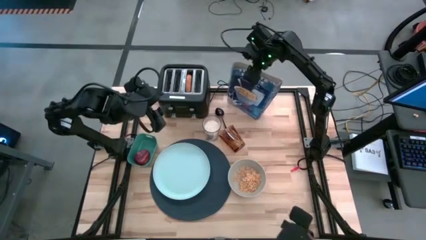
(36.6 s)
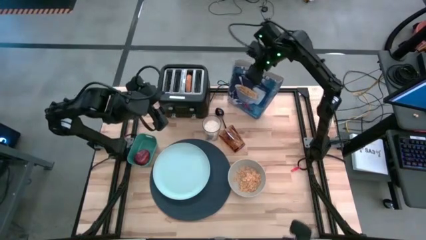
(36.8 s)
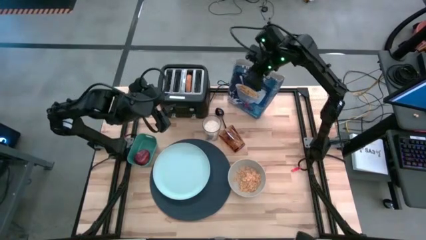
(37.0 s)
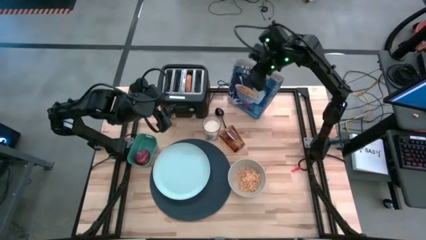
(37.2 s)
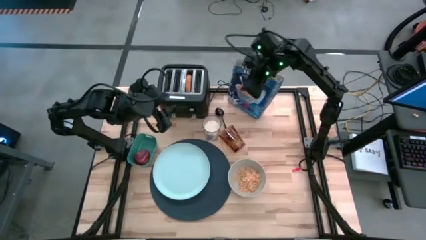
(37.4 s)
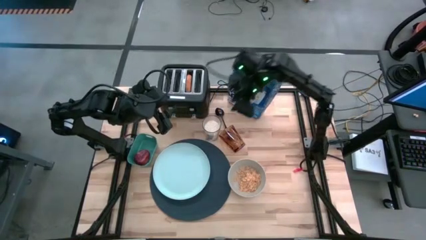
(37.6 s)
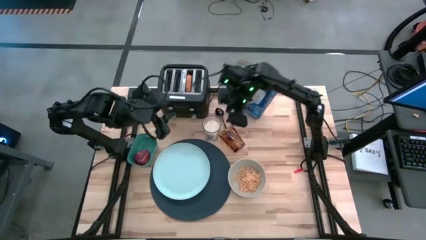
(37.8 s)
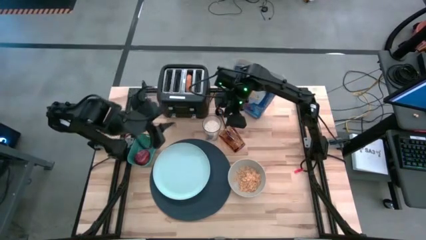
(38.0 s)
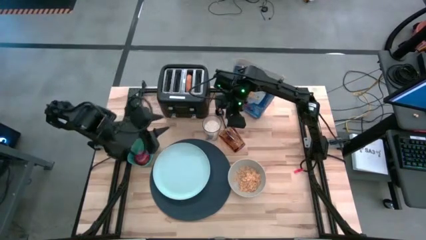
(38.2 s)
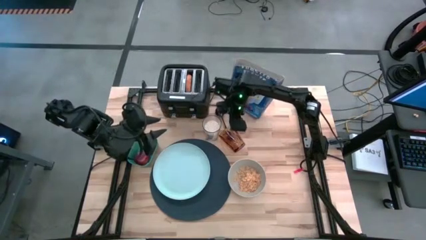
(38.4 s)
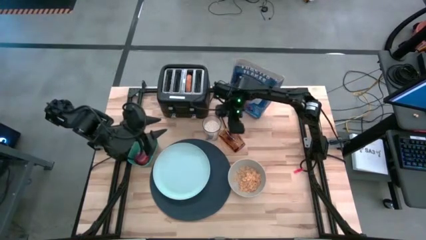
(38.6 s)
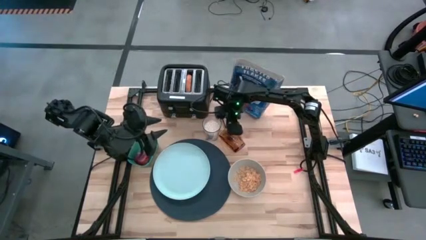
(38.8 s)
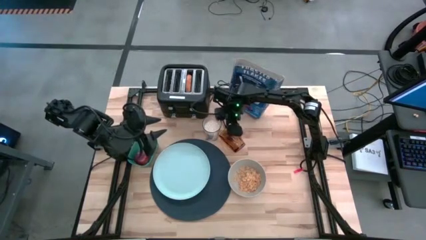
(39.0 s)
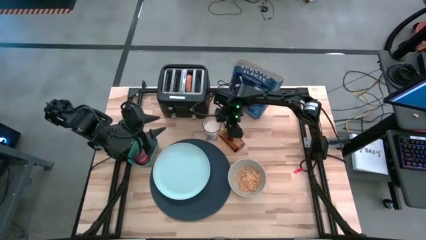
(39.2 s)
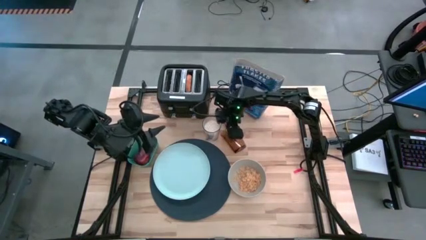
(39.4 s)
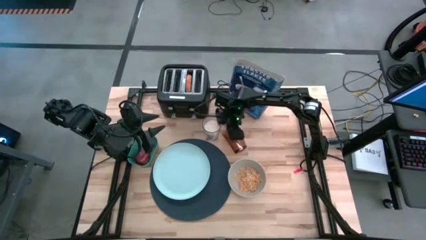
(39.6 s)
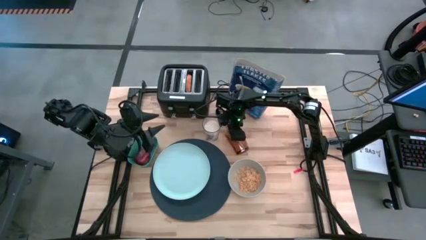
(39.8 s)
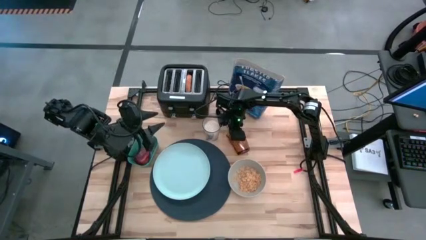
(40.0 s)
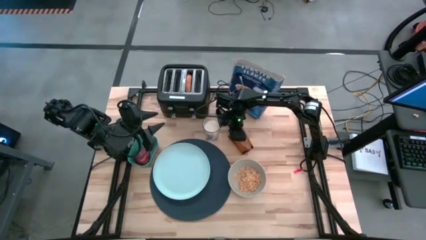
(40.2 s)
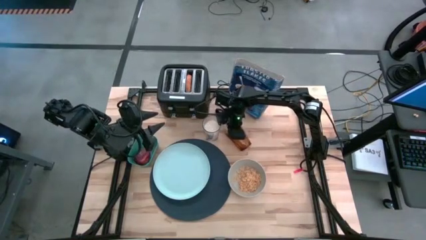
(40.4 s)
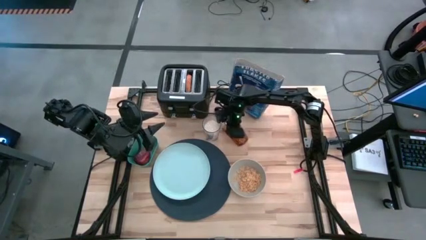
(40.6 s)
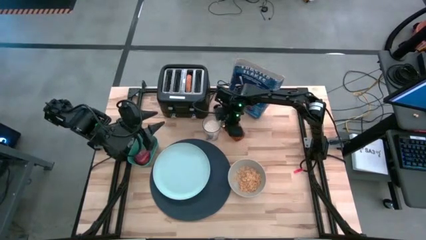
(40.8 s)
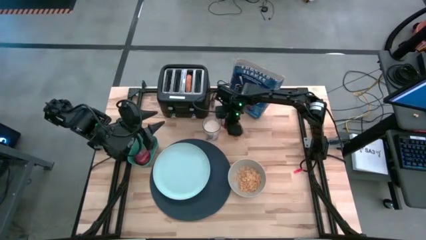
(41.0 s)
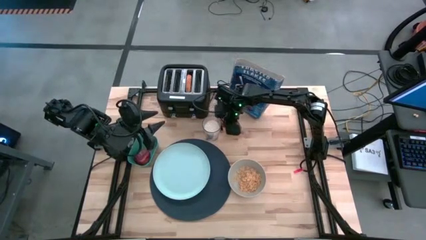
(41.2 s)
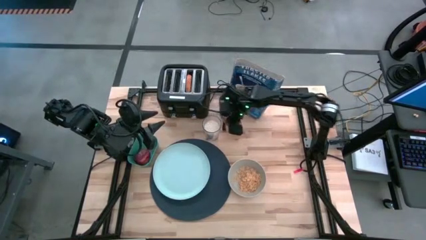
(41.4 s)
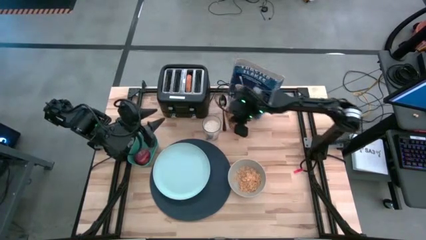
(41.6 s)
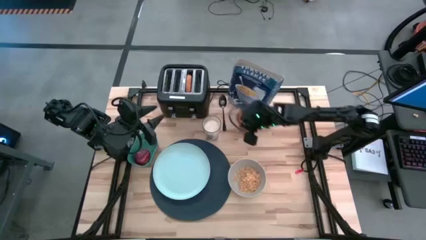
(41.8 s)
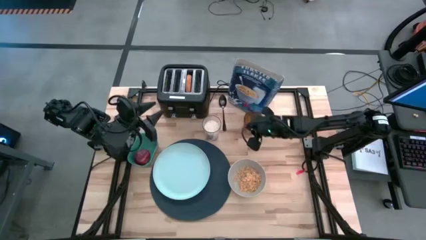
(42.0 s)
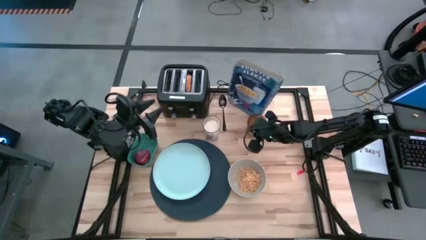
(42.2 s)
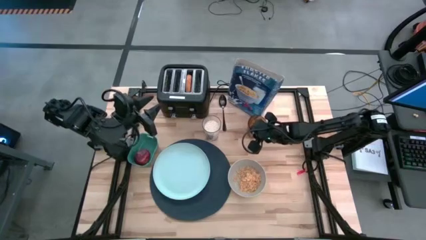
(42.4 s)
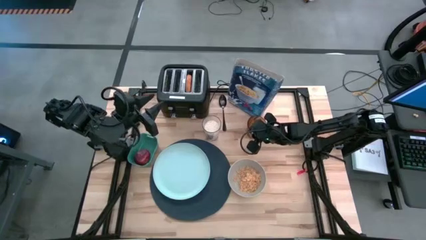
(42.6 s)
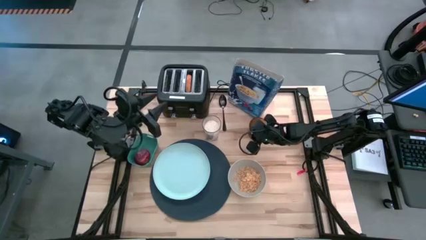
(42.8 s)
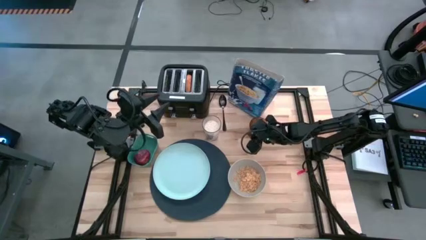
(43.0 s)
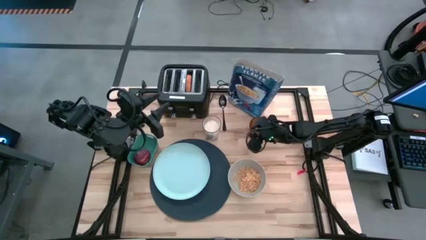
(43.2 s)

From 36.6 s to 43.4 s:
Task: Arrange a breakfast setting
Adjust the orange glass on the table

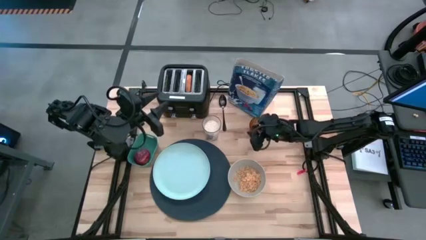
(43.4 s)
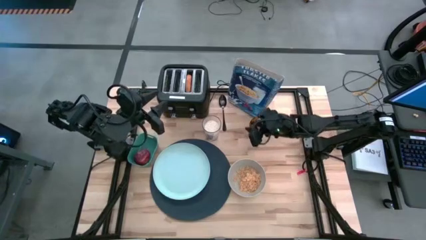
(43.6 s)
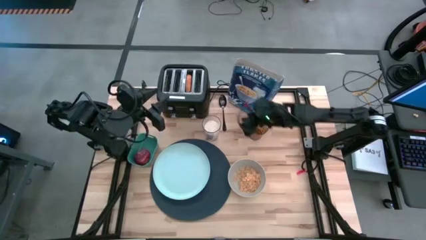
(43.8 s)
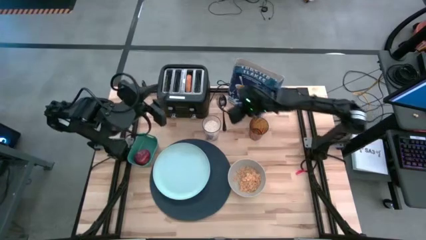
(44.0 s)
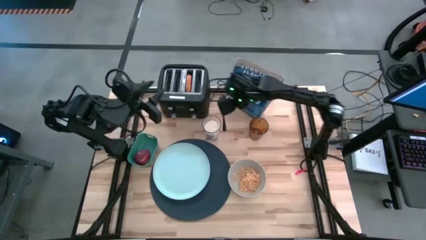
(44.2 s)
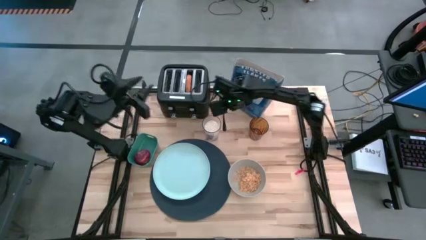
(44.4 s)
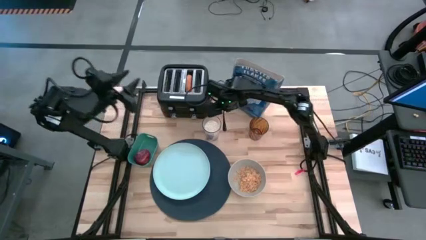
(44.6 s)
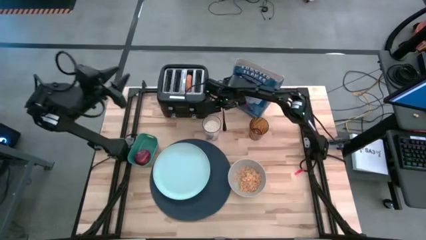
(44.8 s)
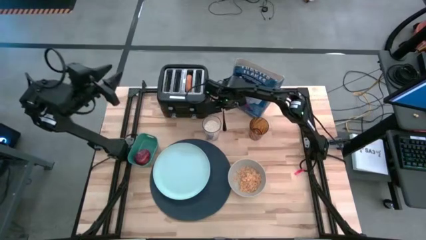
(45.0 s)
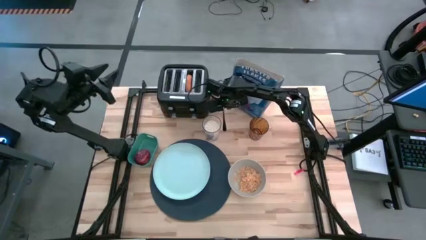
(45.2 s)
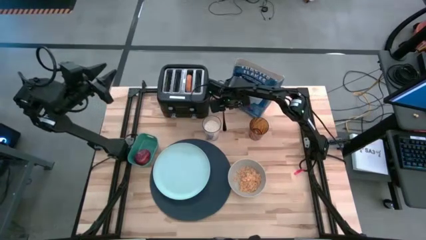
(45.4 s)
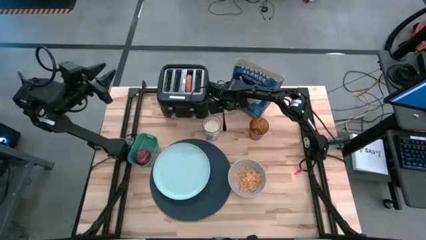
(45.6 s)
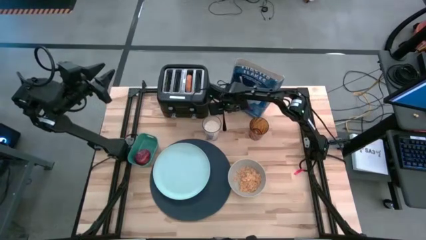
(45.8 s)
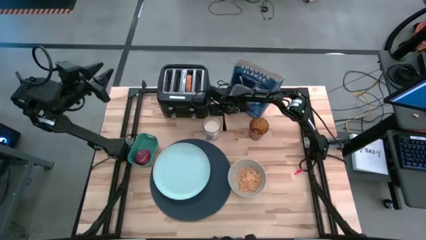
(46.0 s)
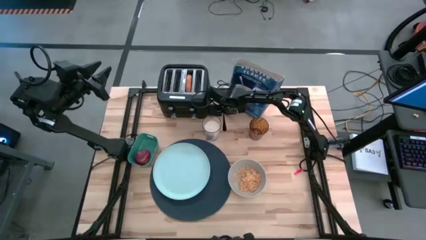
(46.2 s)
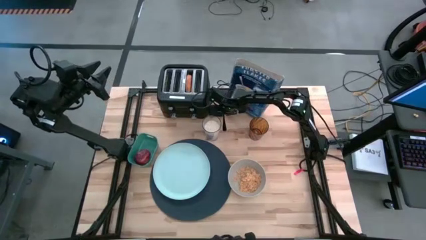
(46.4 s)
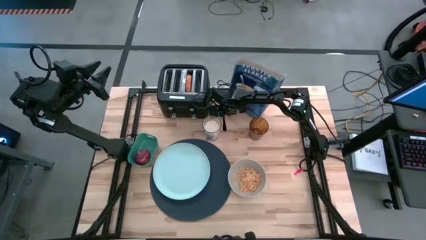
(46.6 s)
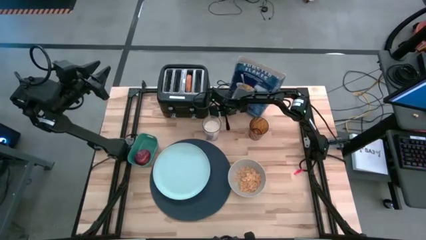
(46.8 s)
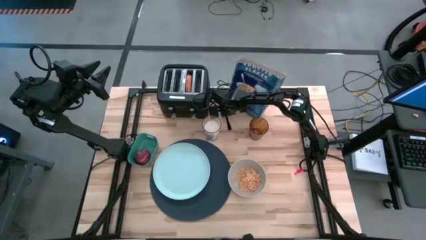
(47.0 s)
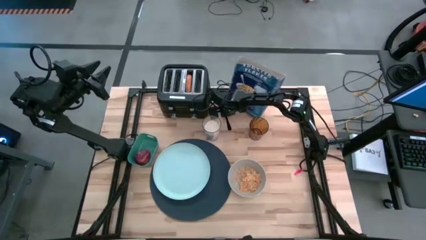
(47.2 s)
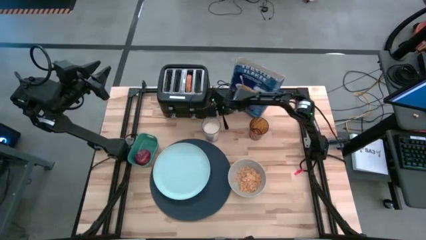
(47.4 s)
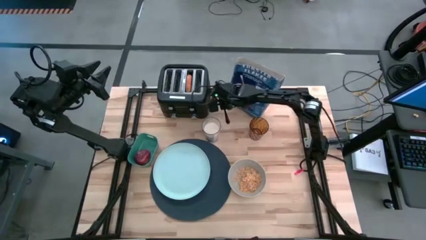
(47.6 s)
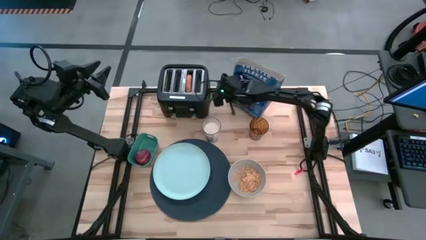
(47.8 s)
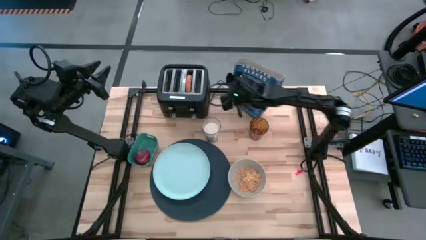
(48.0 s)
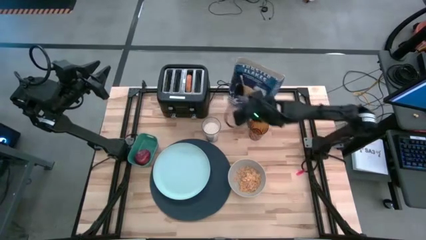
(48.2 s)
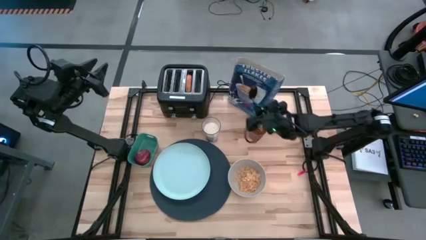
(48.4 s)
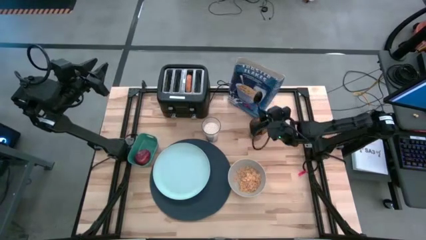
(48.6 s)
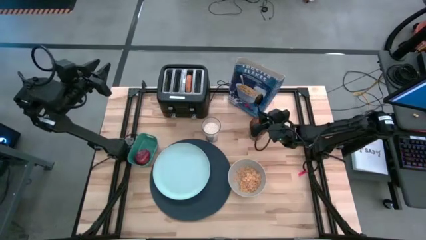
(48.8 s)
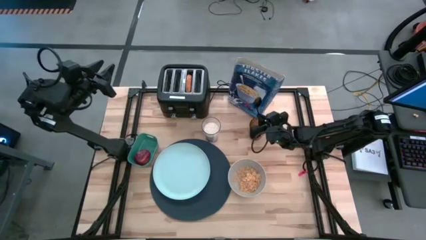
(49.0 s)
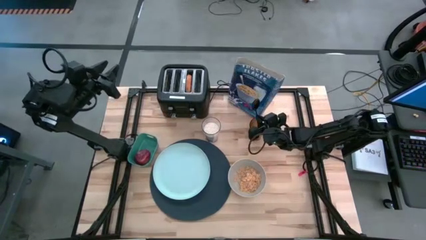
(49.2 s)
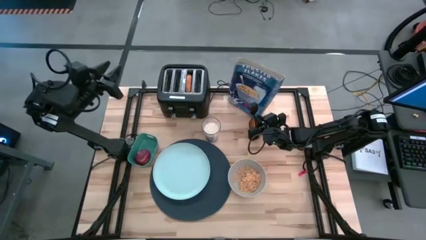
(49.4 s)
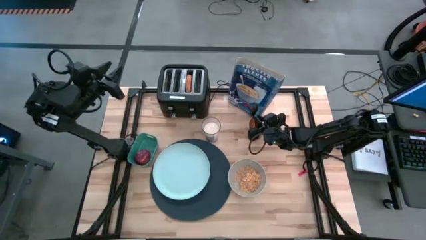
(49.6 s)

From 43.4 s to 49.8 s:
Put the black spoon into the orange glass

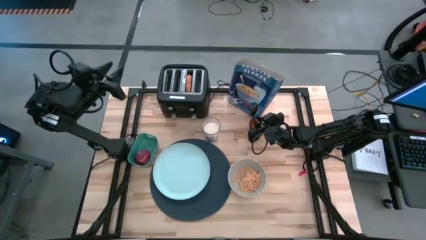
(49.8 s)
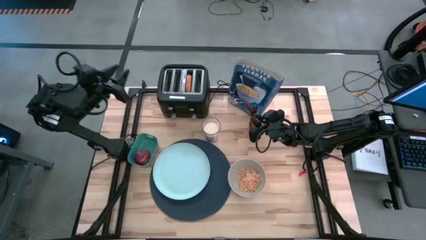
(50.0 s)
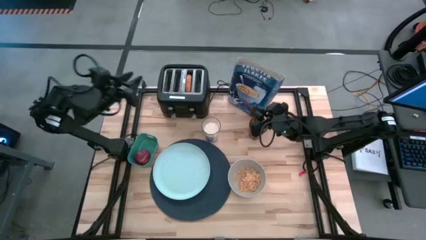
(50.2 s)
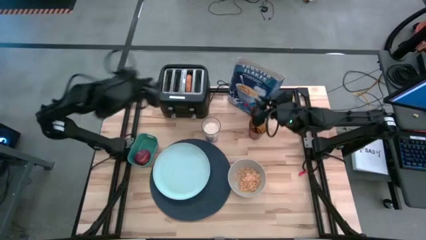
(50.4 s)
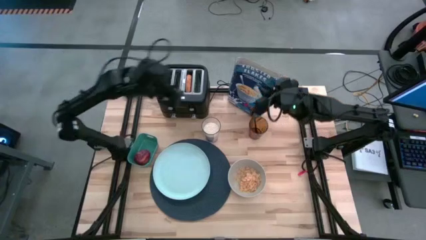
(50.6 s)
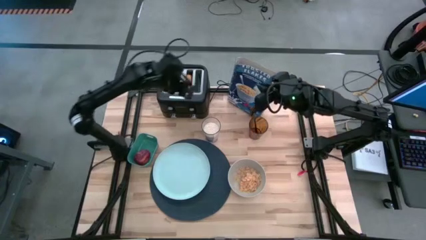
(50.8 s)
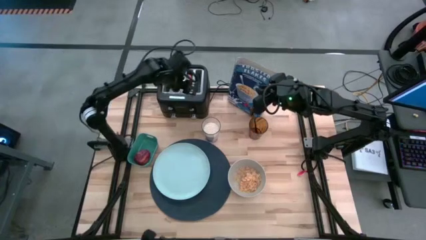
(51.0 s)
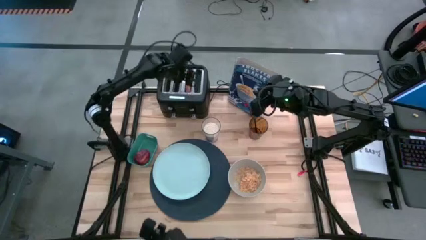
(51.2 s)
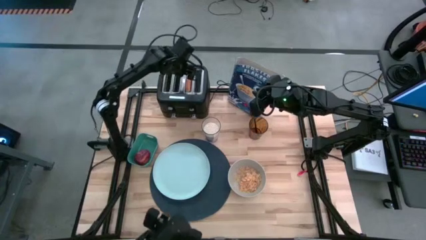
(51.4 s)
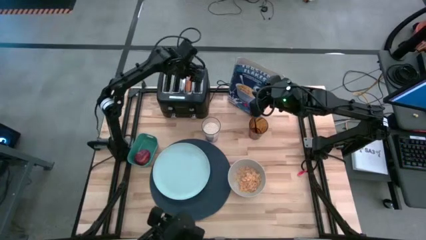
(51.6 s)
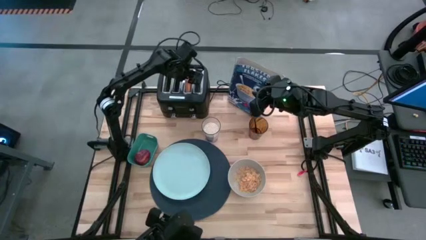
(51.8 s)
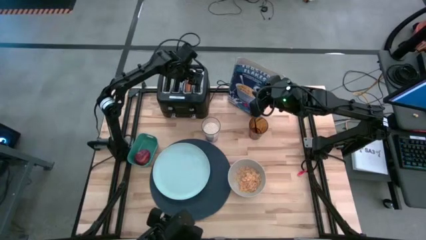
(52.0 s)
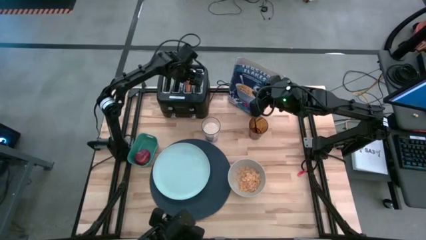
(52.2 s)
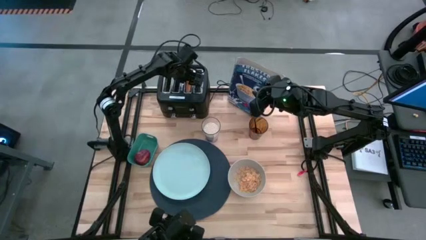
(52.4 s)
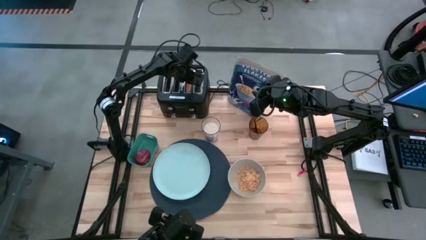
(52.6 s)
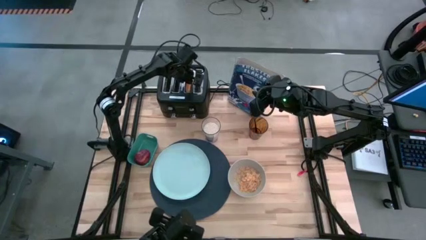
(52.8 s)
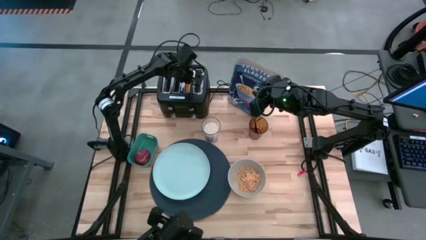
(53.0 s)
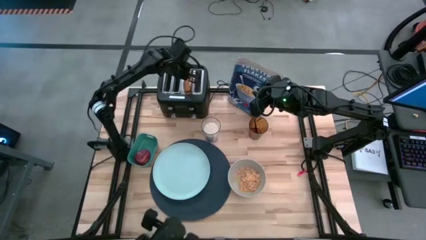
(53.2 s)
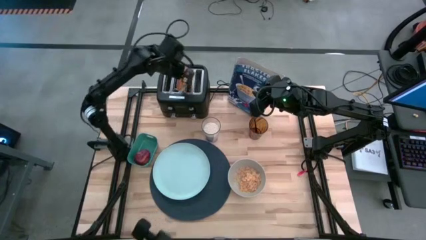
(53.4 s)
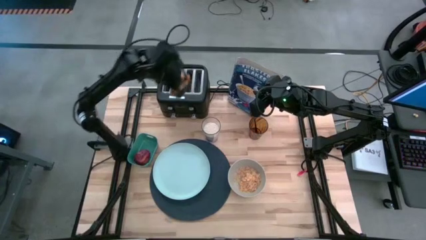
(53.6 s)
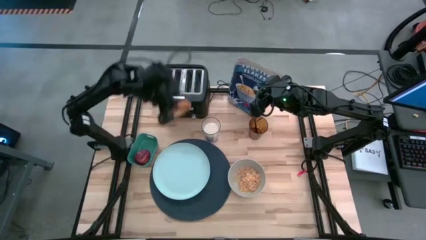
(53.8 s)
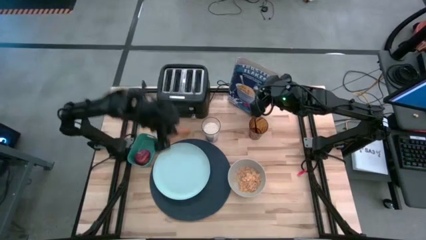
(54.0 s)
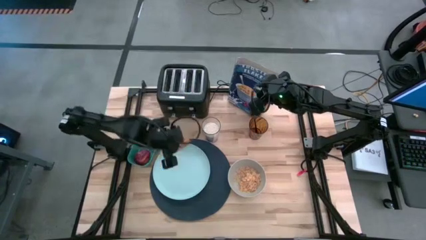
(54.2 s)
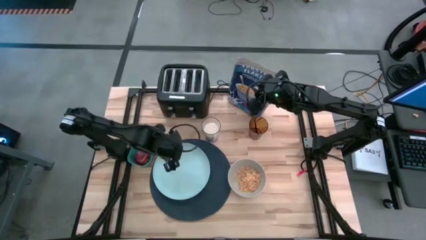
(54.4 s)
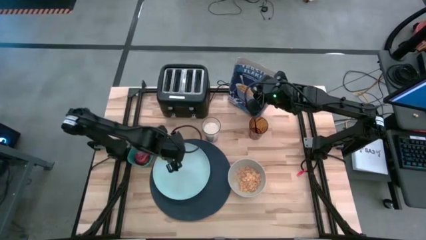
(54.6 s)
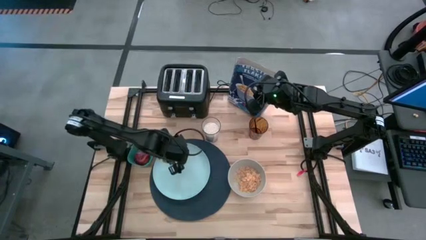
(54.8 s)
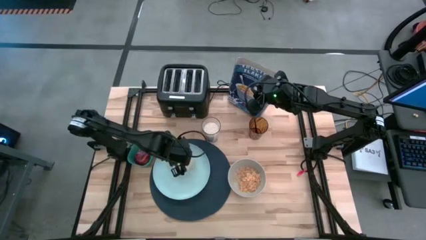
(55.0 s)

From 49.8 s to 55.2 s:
Put the toasted bread on the blue plate
